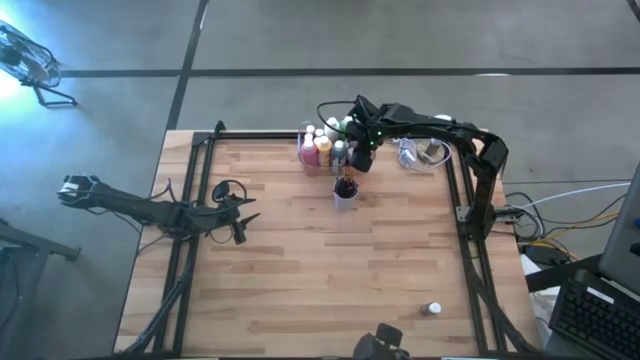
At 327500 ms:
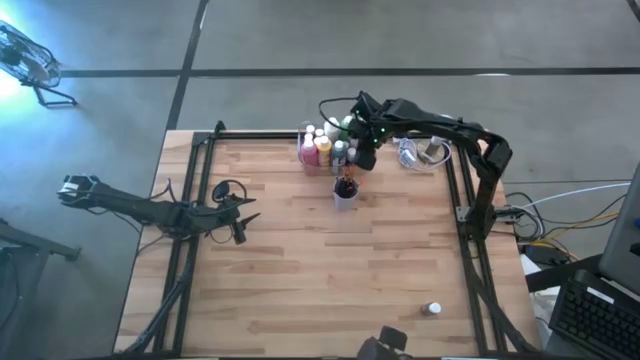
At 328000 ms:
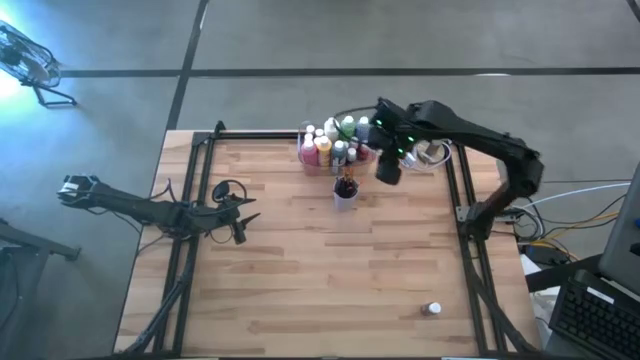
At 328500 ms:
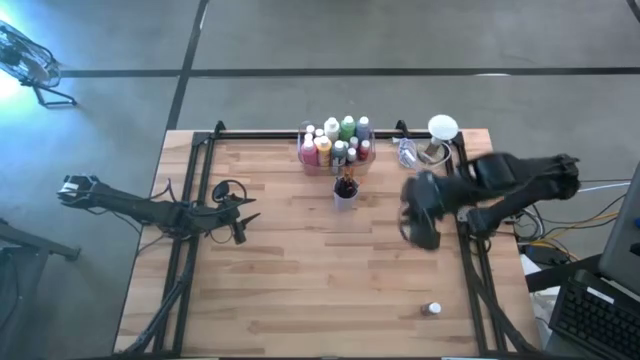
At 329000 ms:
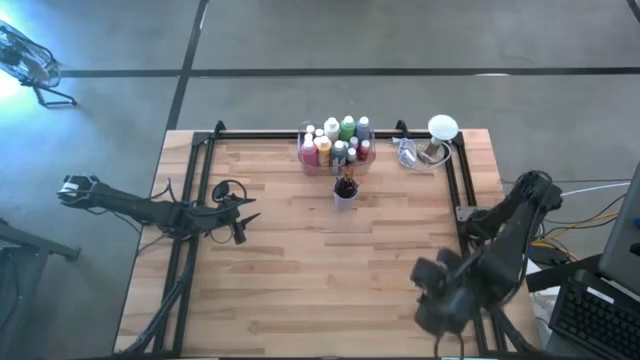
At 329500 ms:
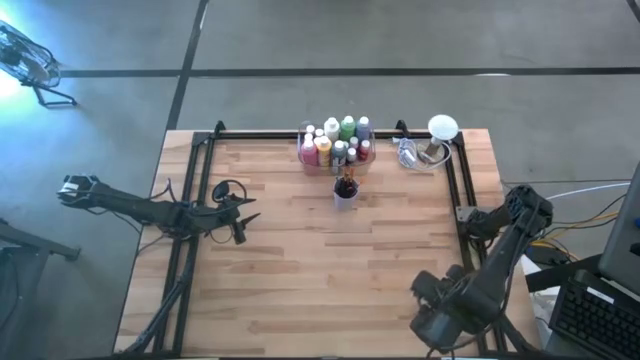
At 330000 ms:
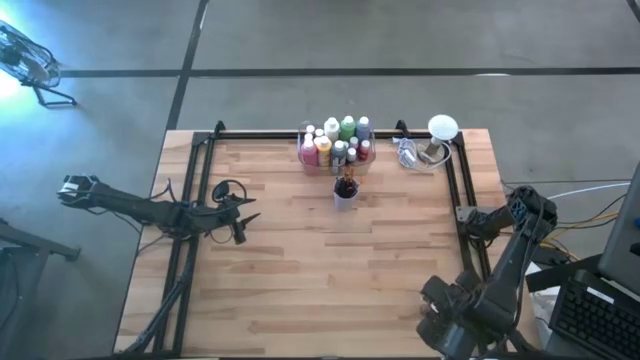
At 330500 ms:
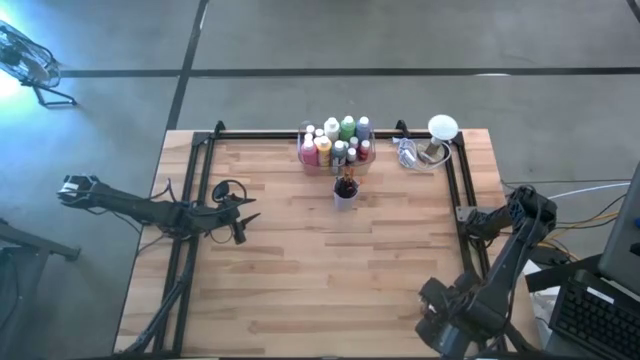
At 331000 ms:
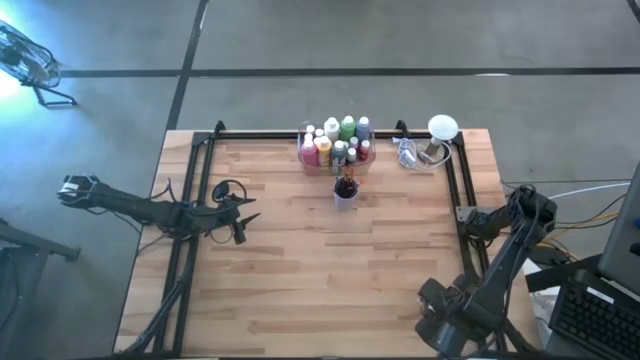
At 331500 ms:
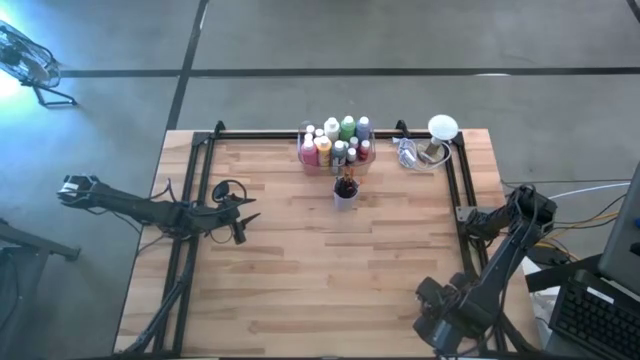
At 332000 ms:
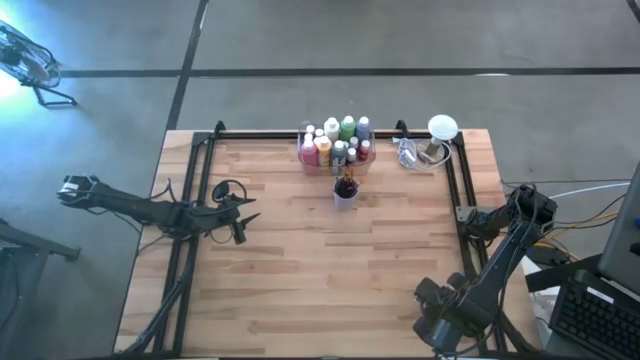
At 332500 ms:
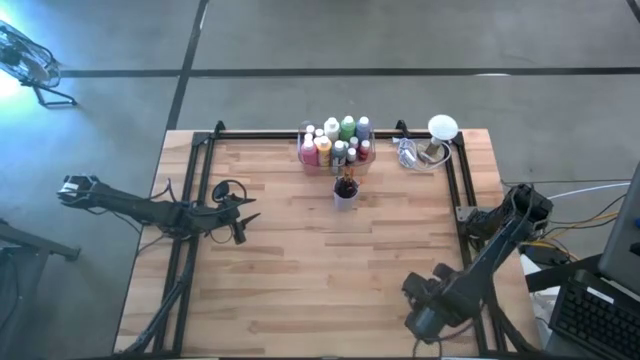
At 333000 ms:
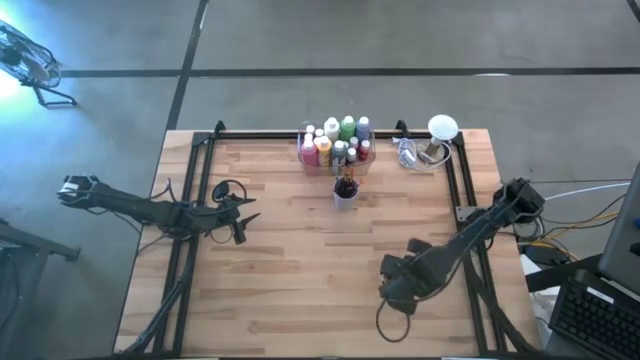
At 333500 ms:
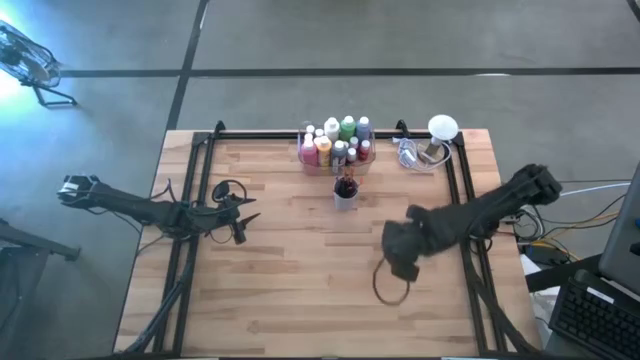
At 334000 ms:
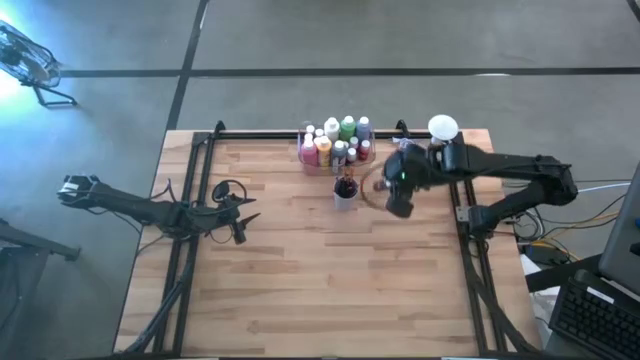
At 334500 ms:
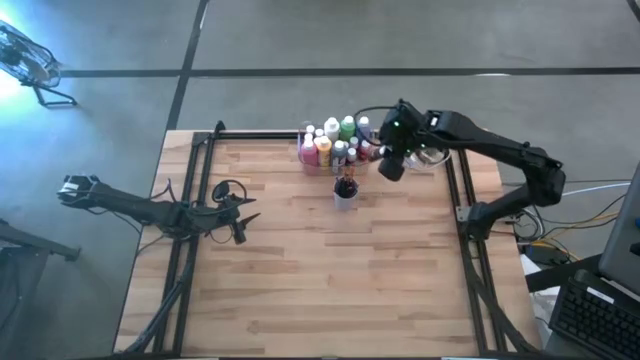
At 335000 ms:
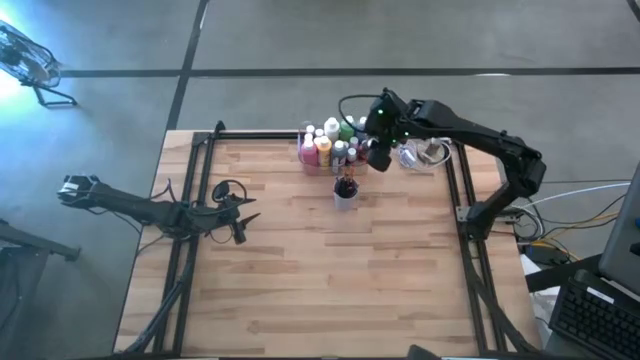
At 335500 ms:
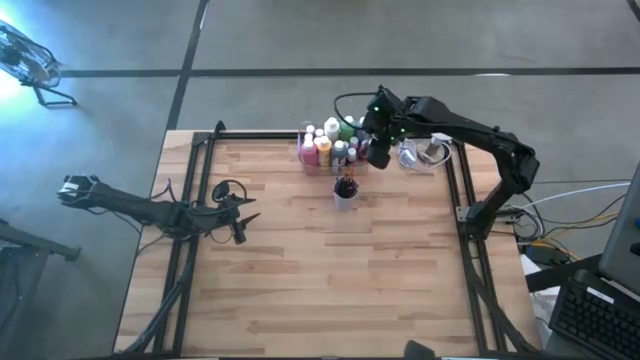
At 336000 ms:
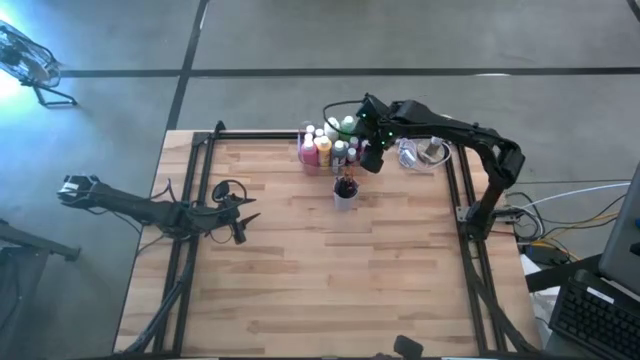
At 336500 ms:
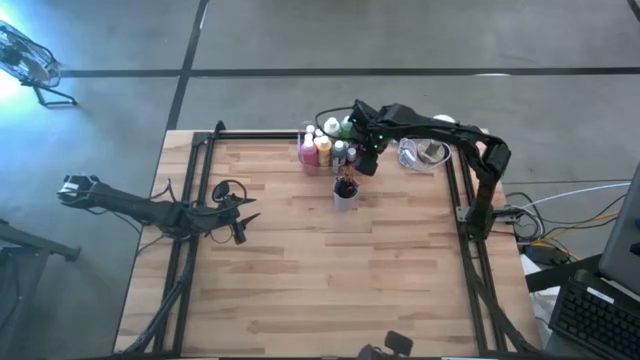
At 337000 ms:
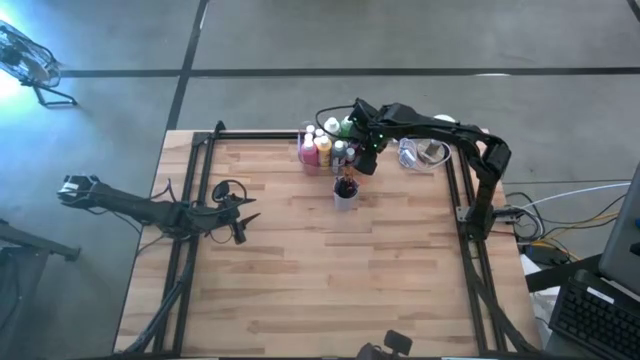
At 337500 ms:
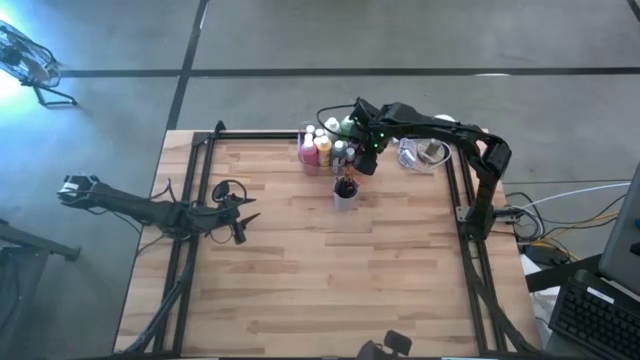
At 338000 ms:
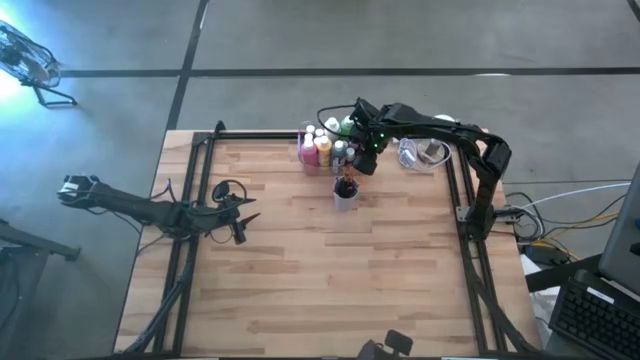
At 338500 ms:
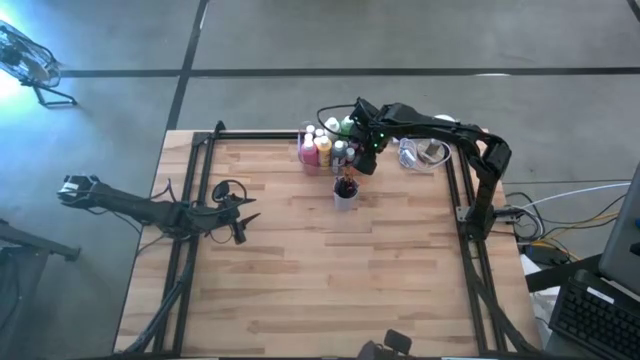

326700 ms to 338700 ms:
Task: Pick & Place Paint Supplies
Put the black paint bottle into the transparent bin

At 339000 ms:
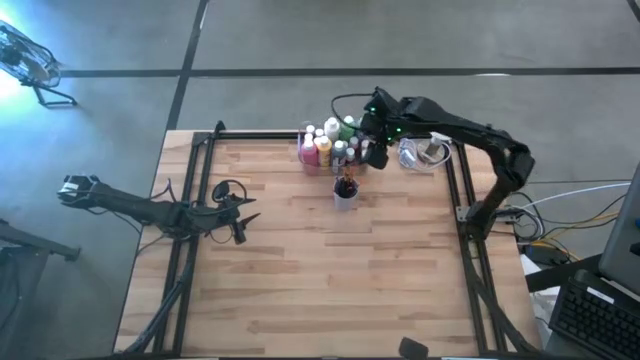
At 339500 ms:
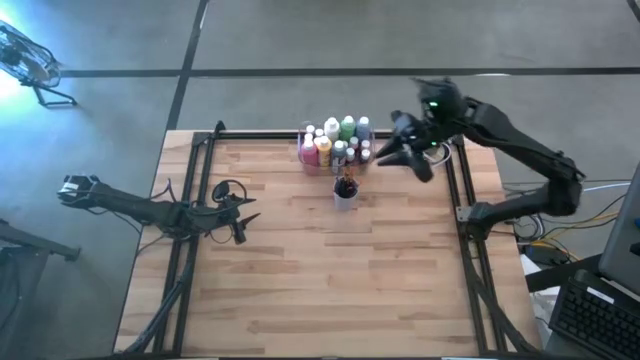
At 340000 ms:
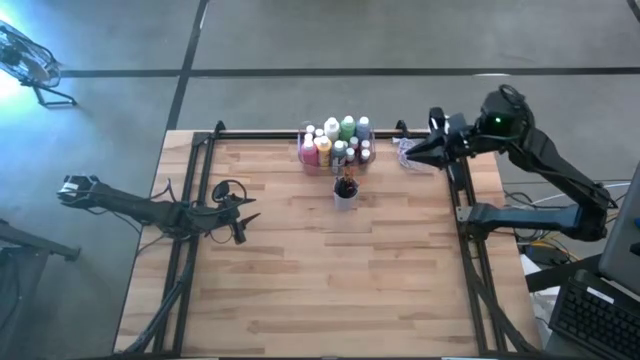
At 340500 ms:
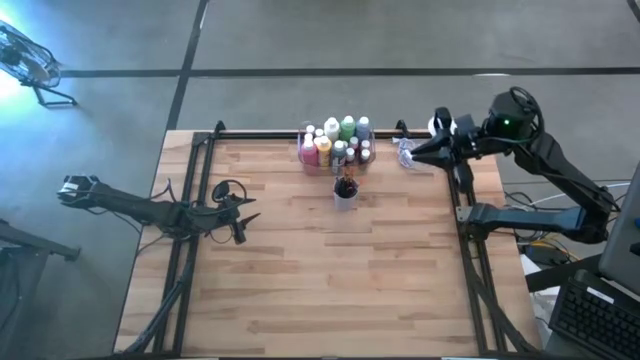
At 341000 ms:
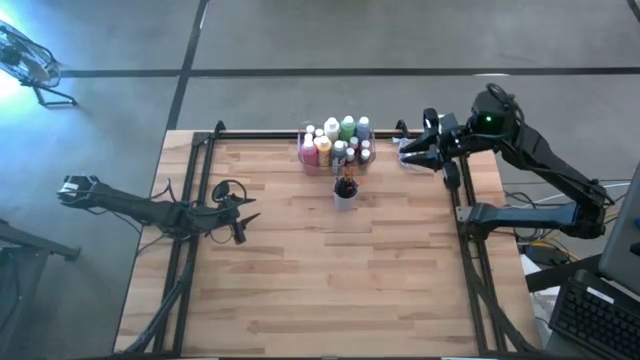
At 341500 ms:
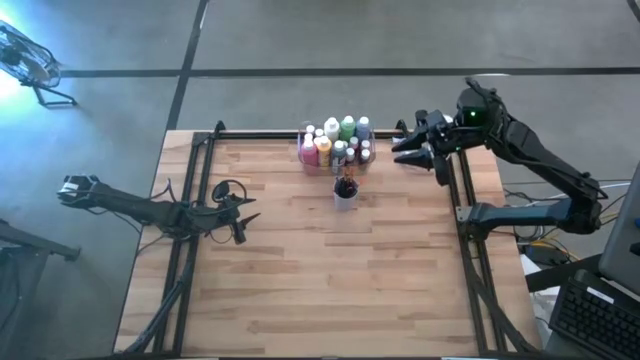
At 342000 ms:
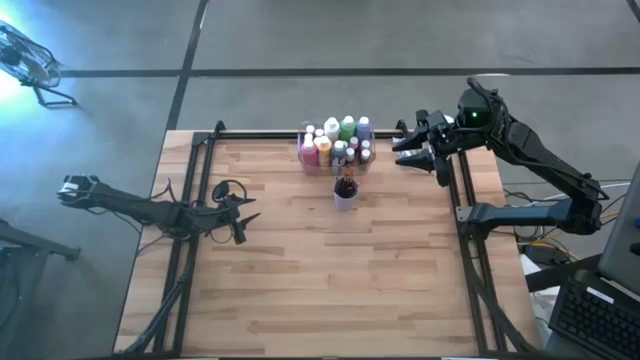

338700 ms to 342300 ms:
Return to Home Position

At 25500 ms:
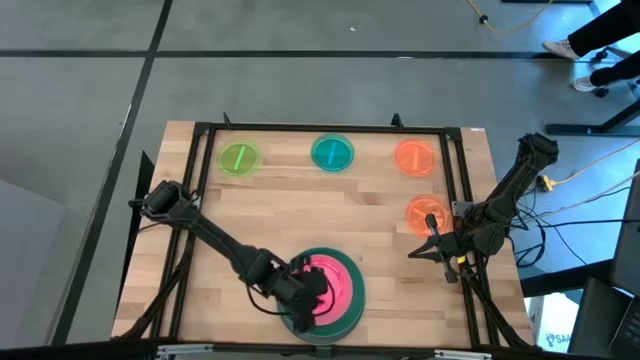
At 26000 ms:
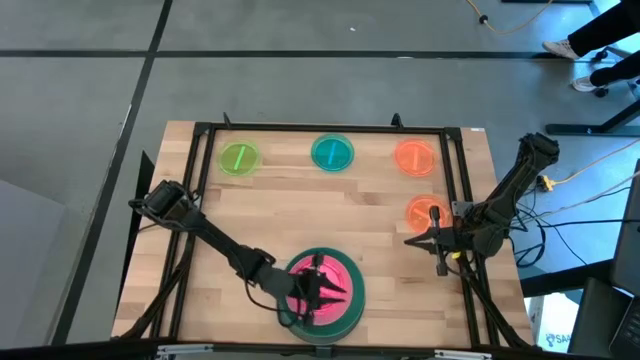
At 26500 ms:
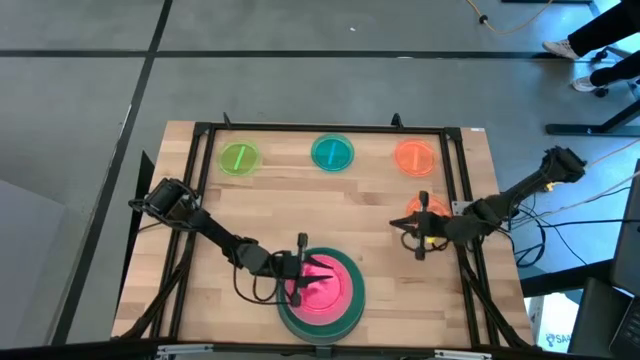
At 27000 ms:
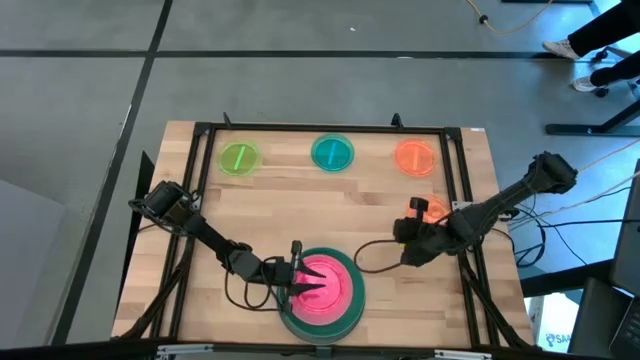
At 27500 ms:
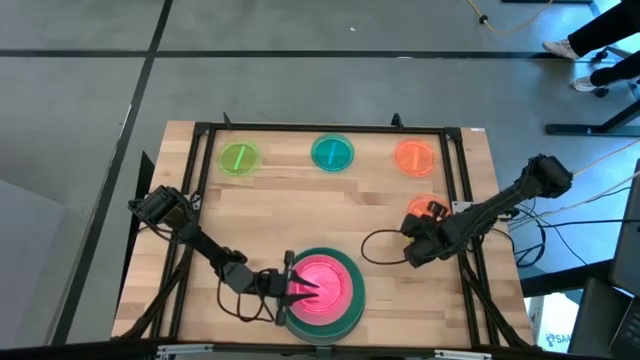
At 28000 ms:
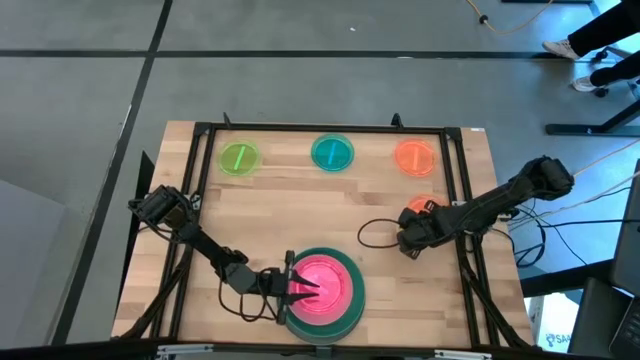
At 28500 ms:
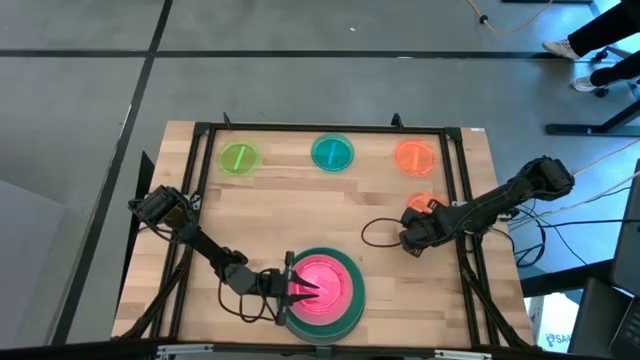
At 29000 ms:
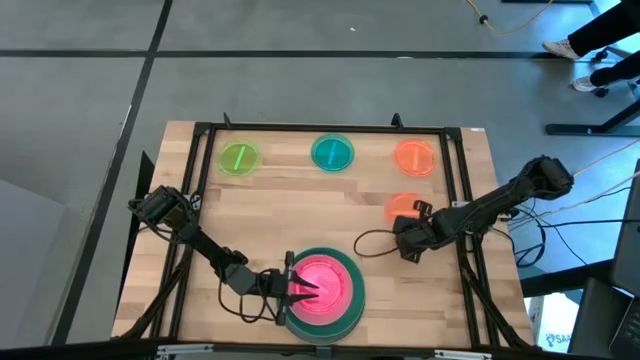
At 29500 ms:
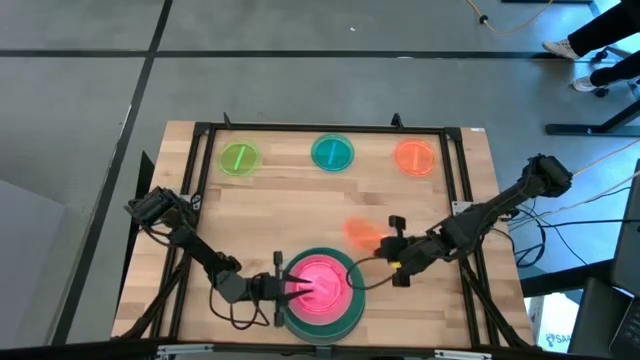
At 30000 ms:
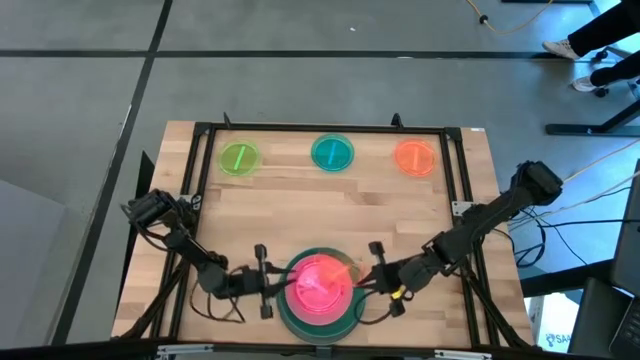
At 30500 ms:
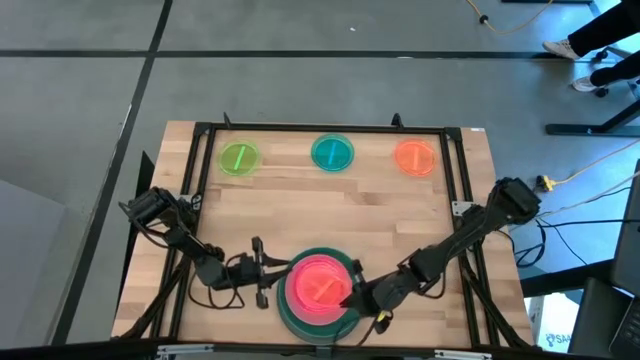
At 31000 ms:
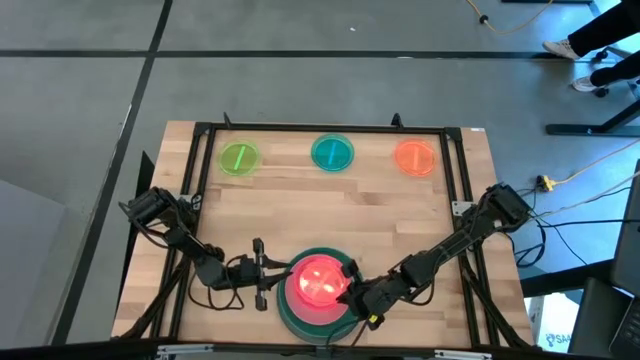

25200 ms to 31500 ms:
Task: Stack plastic plates
Stack the bottom light orange plate on top of the light pink plate
